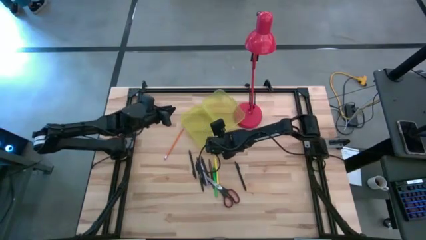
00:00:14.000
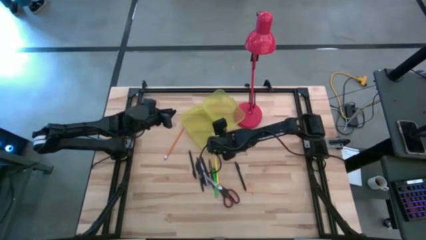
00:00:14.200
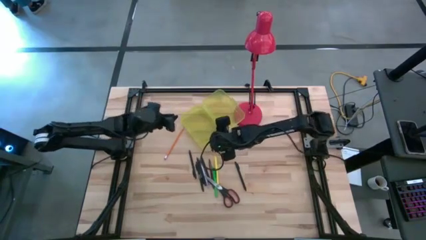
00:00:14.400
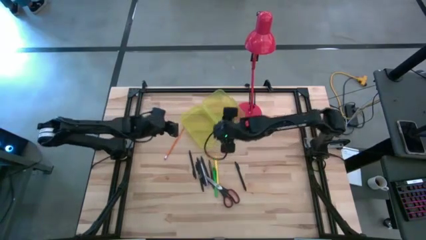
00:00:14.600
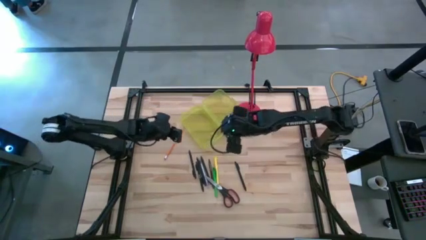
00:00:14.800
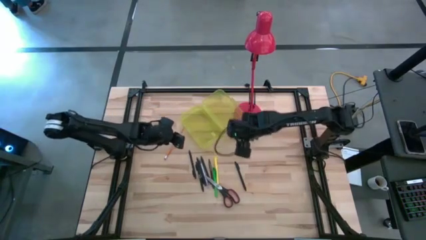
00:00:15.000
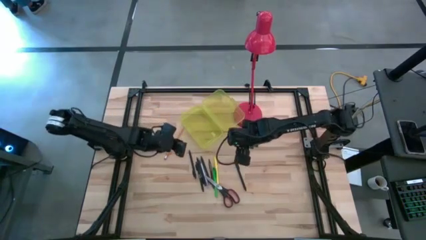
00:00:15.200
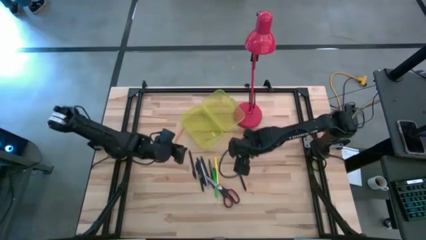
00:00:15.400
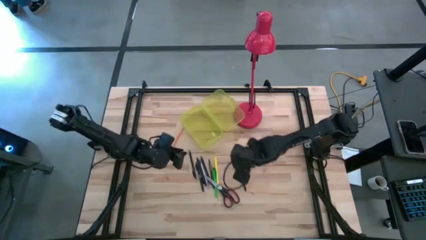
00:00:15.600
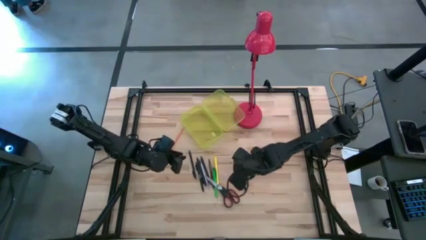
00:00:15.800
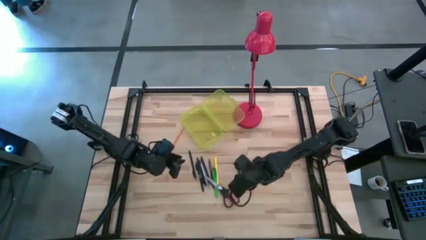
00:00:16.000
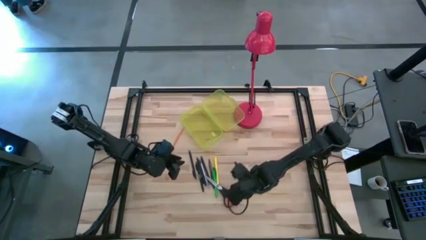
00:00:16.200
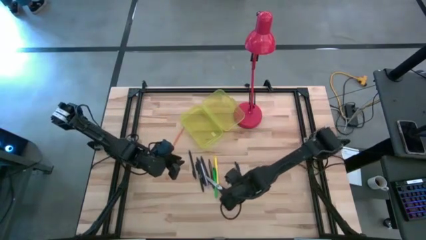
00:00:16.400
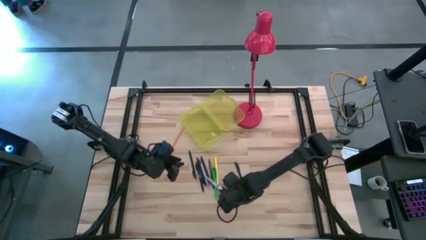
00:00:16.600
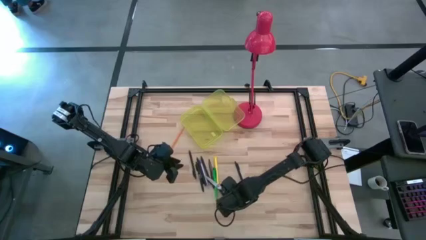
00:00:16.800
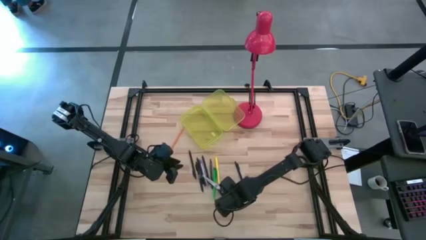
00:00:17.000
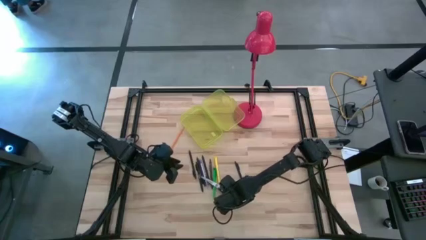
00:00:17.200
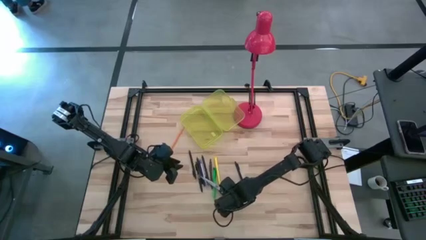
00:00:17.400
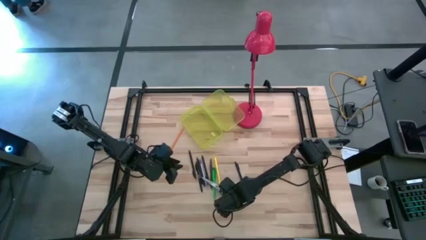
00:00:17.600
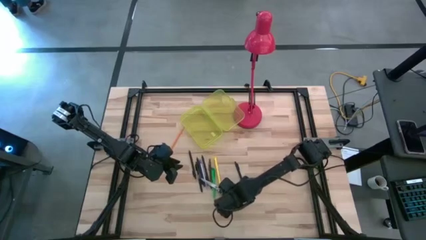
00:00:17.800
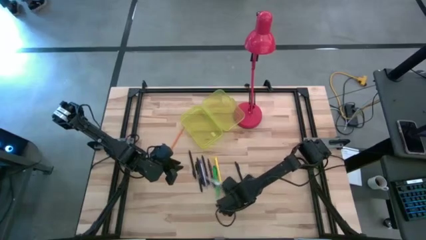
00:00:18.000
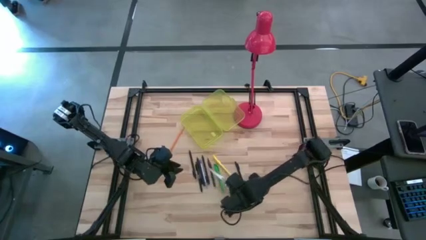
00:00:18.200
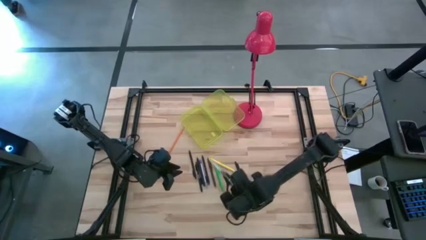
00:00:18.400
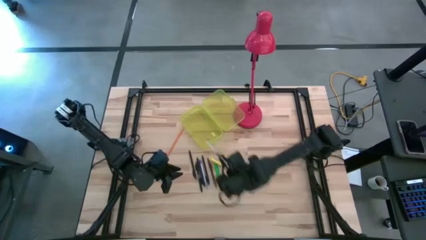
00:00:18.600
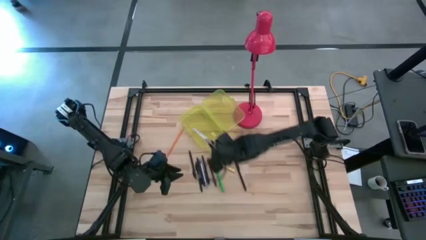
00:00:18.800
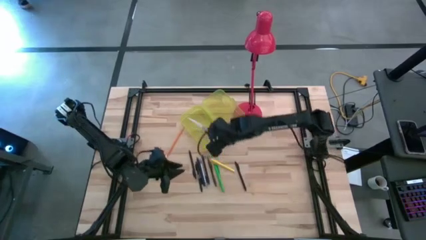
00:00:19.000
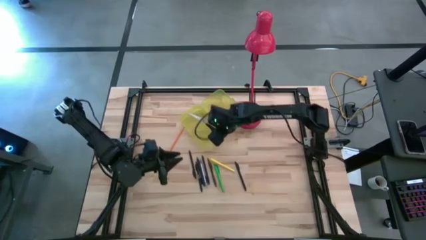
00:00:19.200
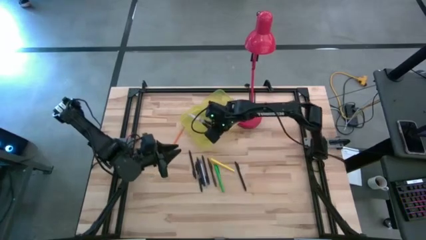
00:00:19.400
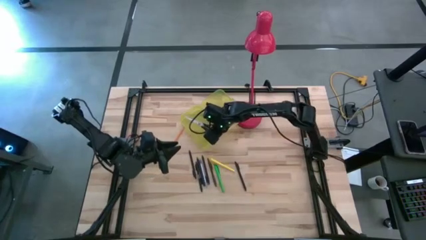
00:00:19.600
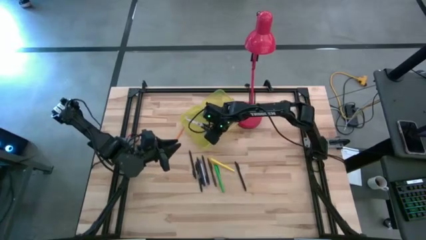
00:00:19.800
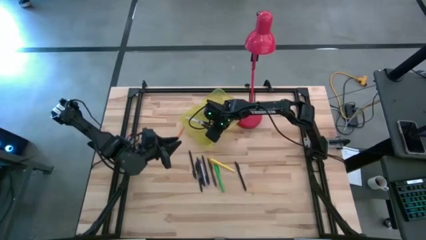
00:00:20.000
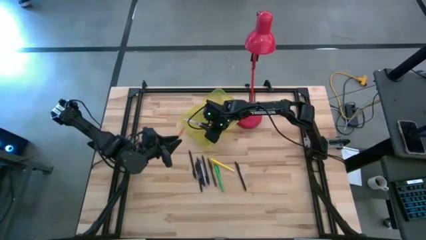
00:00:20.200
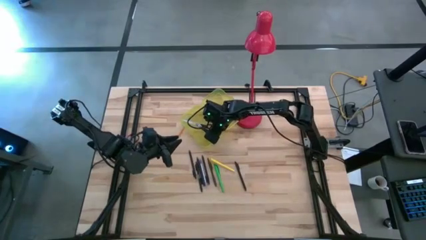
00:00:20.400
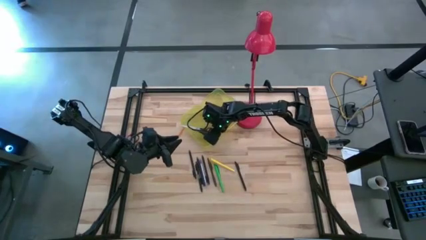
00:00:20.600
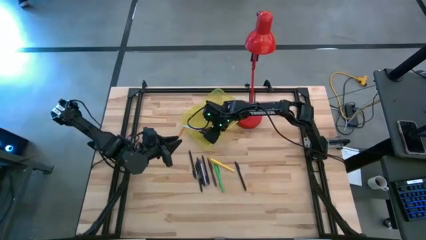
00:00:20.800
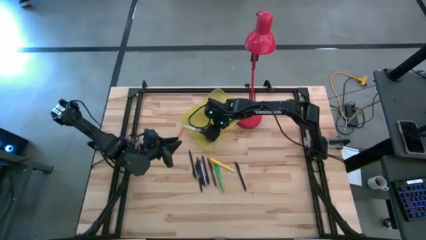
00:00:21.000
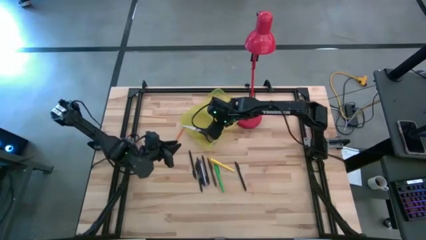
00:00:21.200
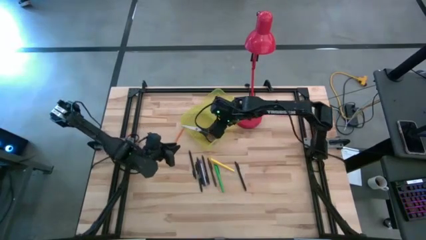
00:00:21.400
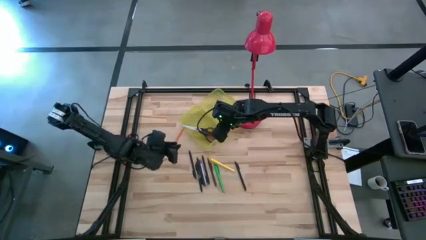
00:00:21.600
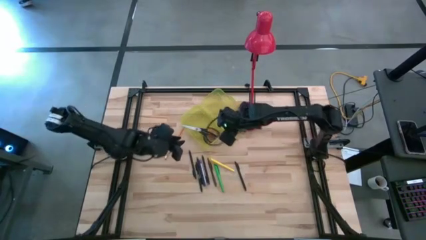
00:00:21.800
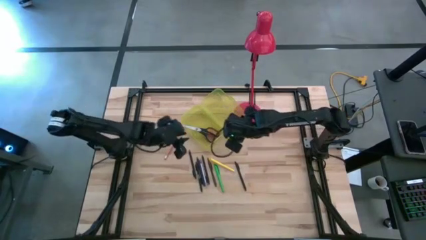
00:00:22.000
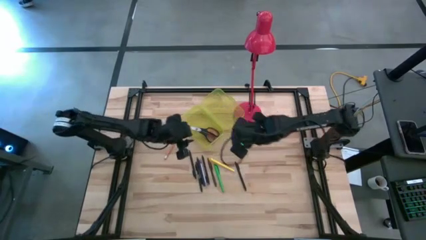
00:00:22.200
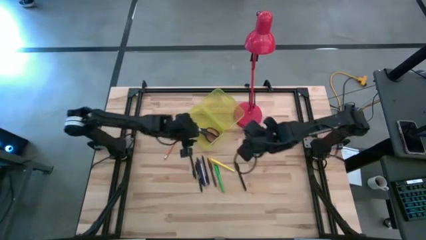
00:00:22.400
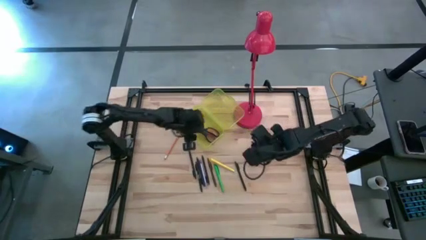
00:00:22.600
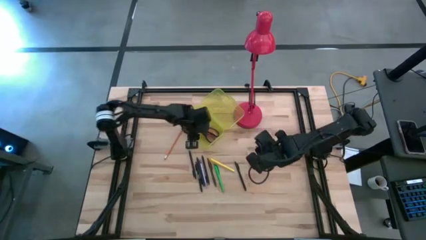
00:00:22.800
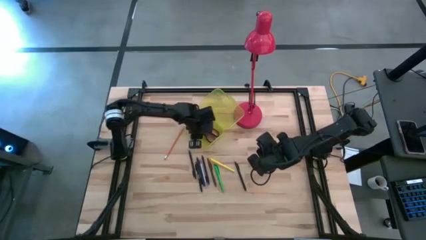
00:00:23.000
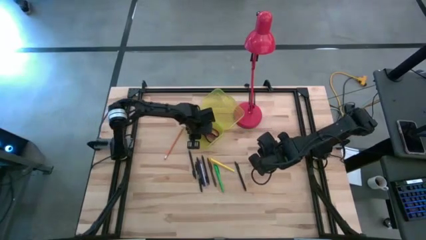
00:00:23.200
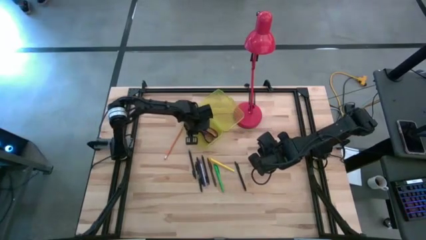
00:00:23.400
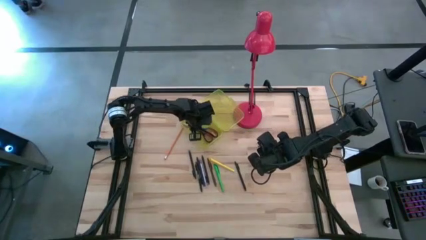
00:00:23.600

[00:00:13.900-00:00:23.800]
Task: Pick & place school supplies into a supply box
Put the black scissors into the yellow supply box

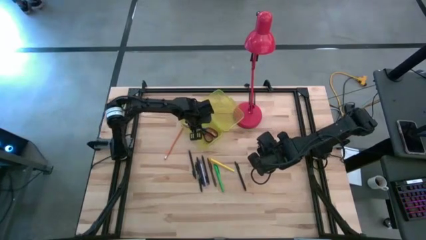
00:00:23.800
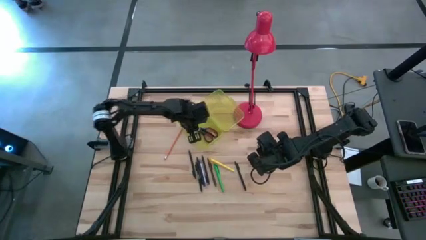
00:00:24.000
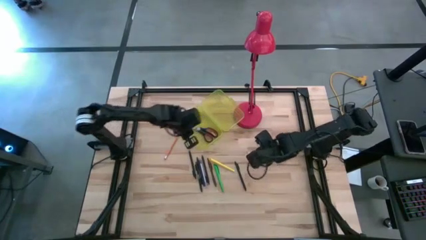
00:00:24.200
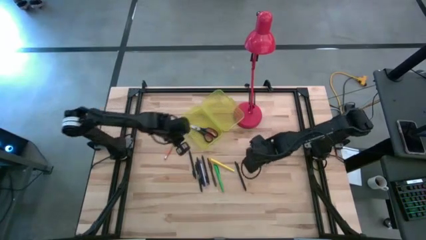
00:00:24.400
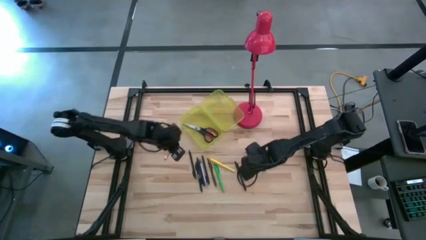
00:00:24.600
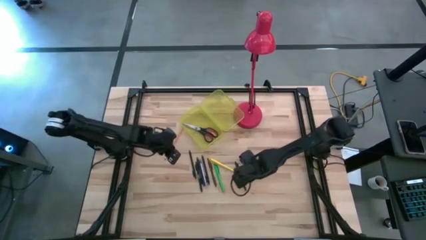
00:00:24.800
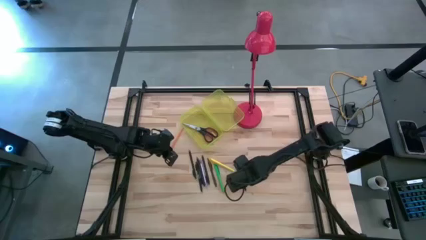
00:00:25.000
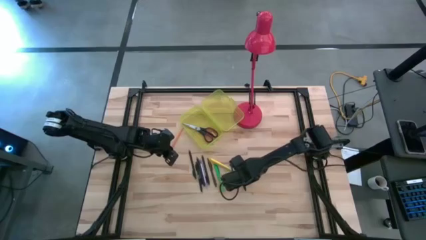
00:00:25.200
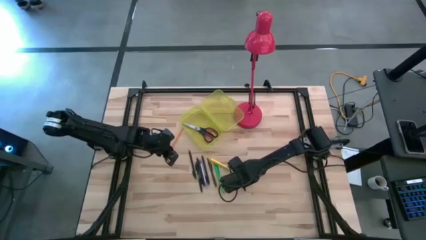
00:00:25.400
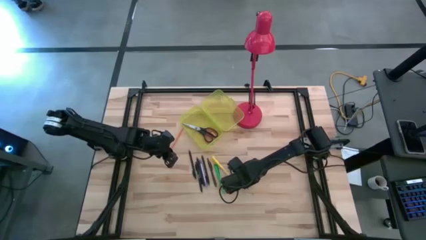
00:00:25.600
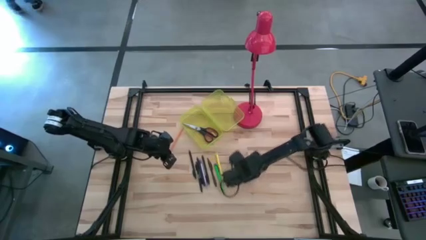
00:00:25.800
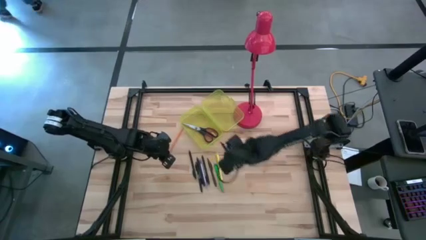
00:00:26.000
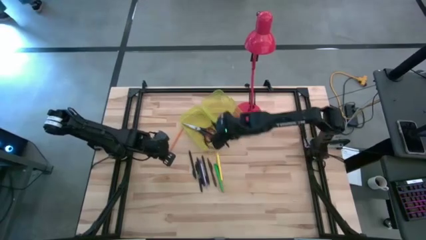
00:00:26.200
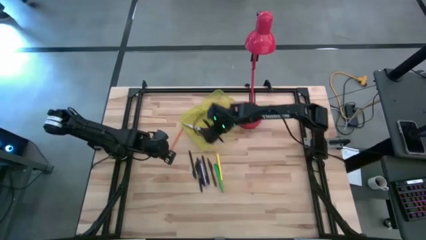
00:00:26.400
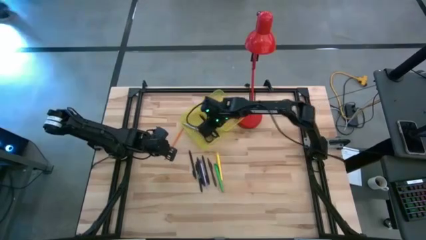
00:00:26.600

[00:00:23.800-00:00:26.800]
Put the black pen into the yellow supply box

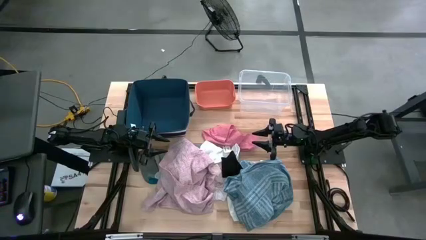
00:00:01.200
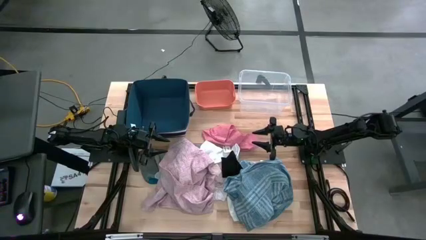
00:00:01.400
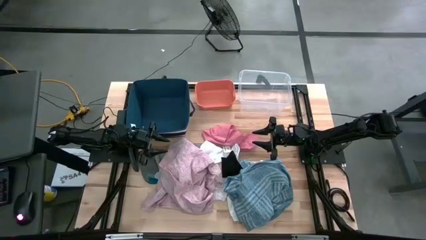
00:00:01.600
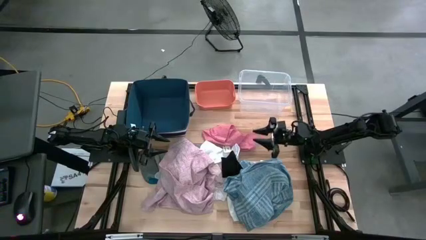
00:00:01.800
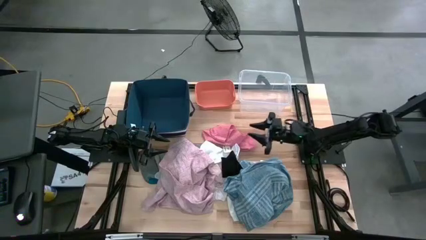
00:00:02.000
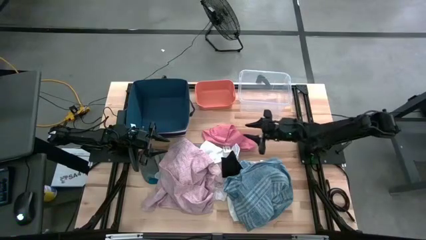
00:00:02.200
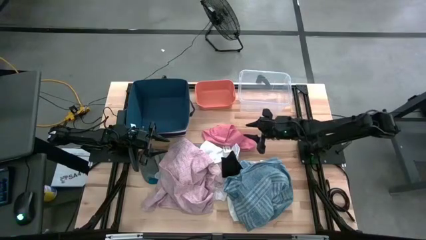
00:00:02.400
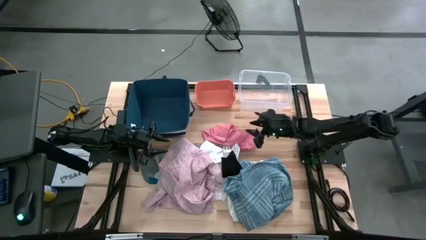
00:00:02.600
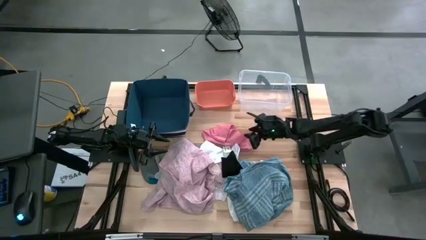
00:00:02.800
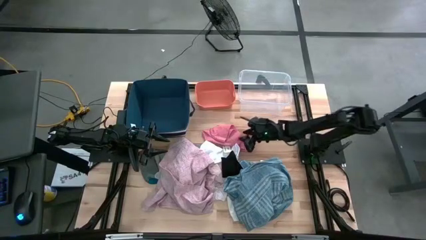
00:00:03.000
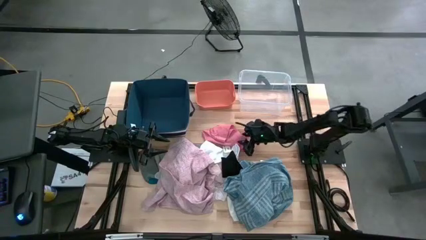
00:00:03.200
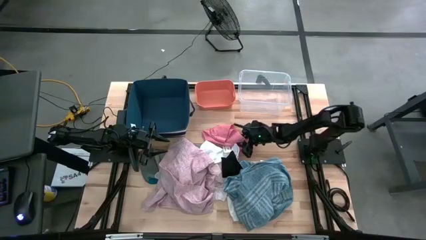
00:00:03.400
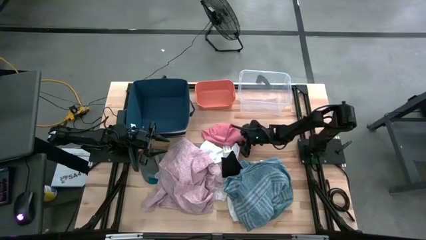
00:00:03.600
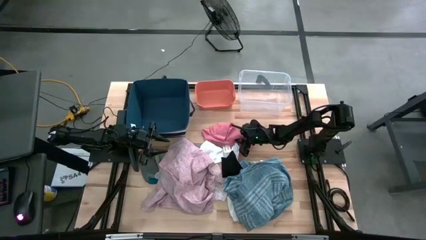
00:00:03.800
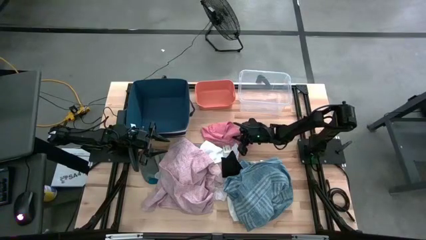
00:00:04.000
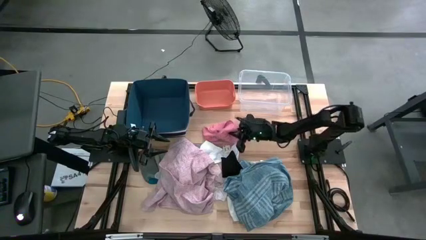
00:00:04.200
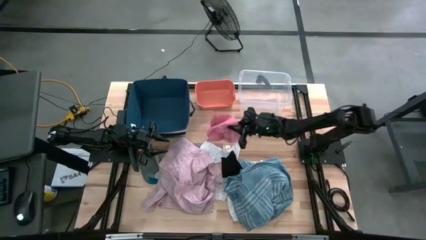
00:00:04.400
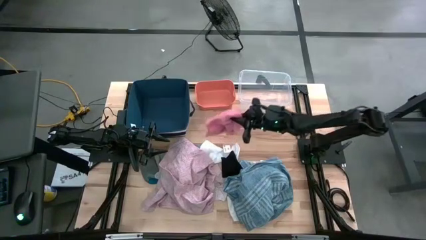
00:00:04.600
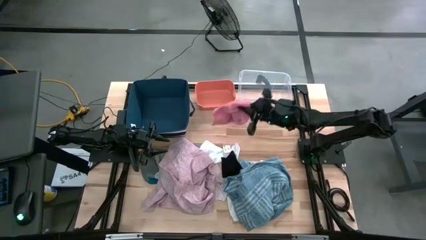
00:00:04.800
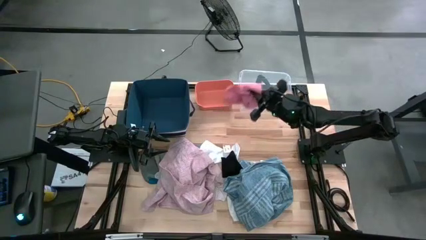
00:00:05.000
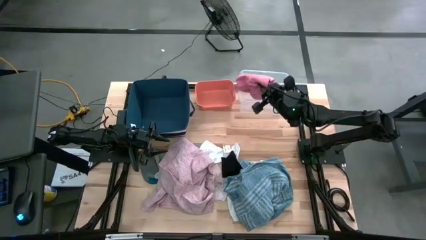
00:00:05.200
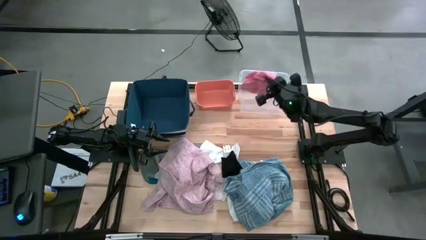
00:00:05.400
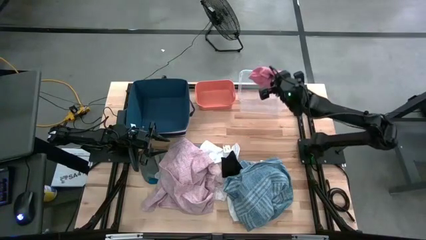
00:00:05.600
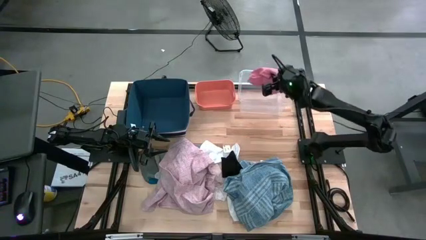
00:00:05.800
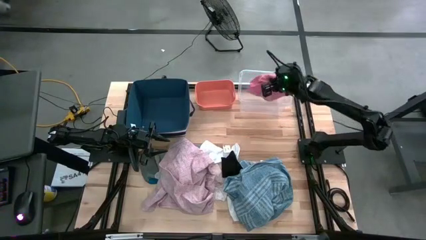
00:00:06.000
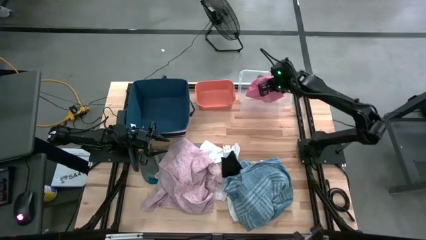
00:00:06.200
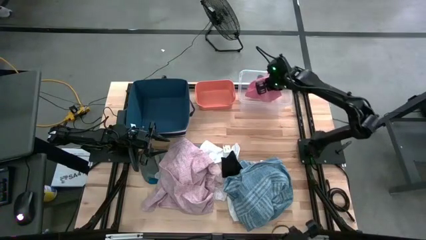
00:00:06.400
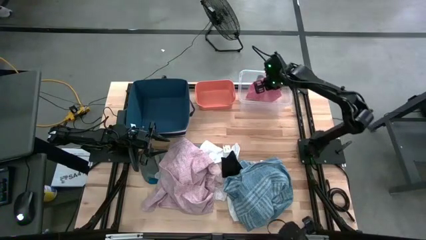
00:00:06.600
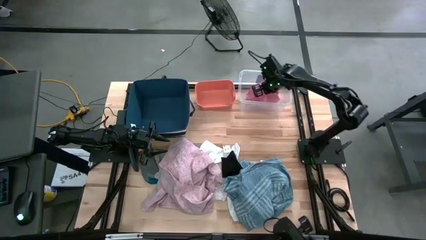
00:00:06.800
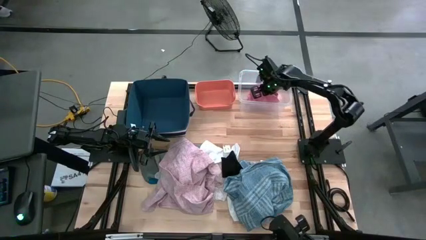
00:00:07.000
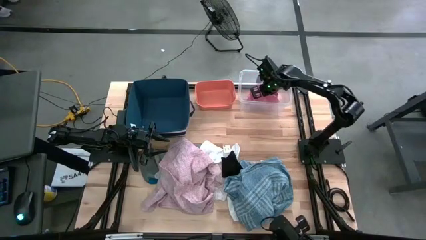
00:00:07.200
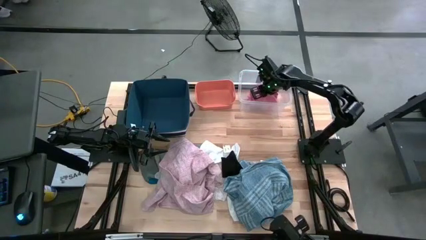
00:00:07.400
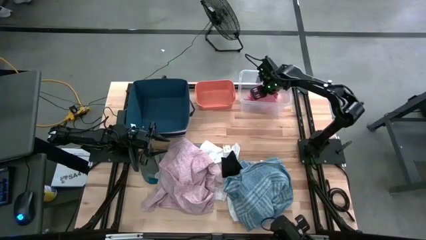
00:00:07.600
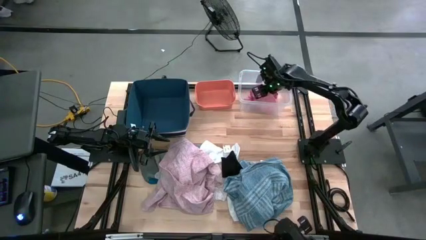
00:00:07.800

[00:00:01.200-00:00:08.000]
Task: Pick & Place Cloths
Put the pink underwear into the transparent bin
